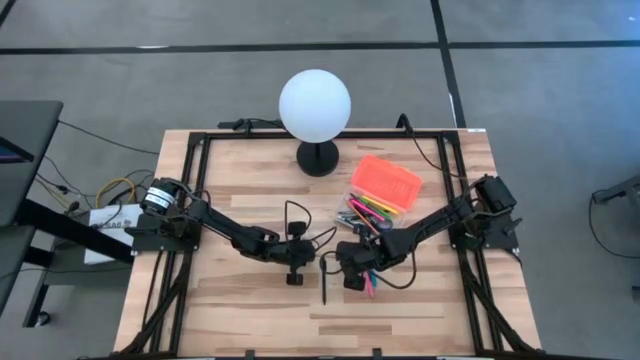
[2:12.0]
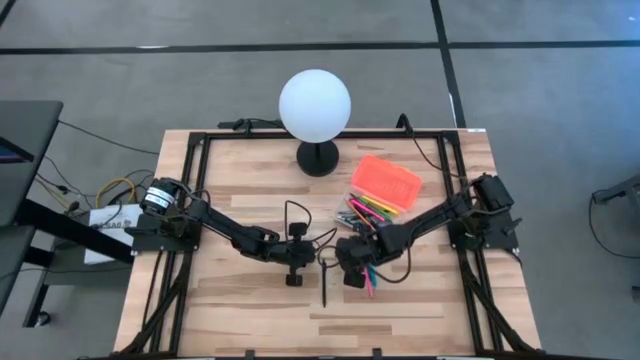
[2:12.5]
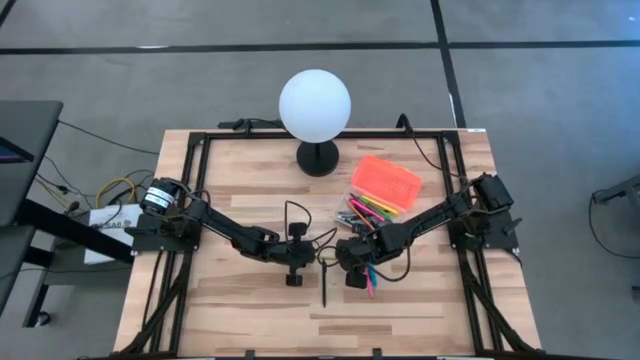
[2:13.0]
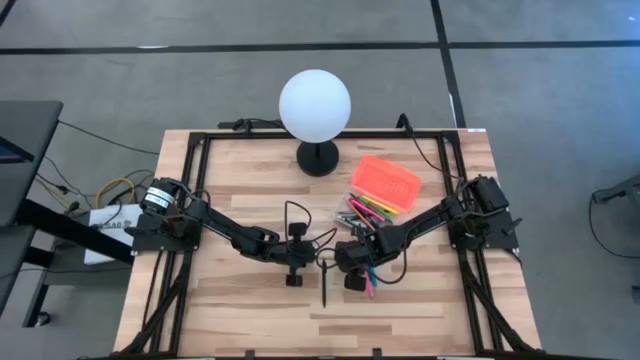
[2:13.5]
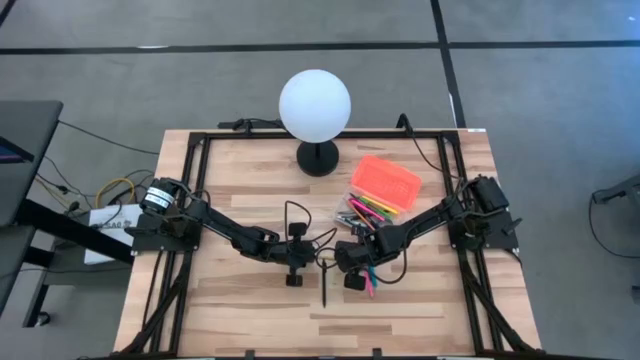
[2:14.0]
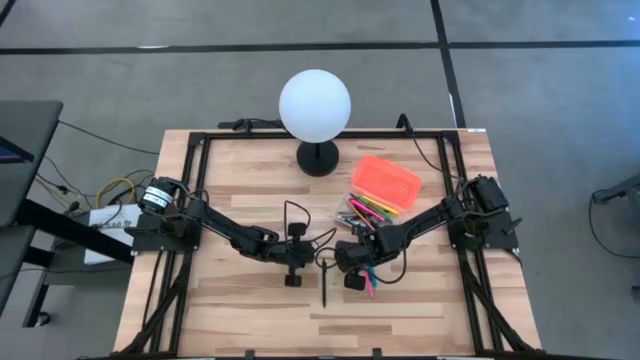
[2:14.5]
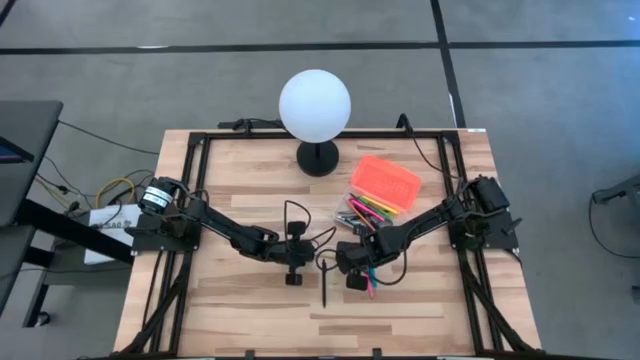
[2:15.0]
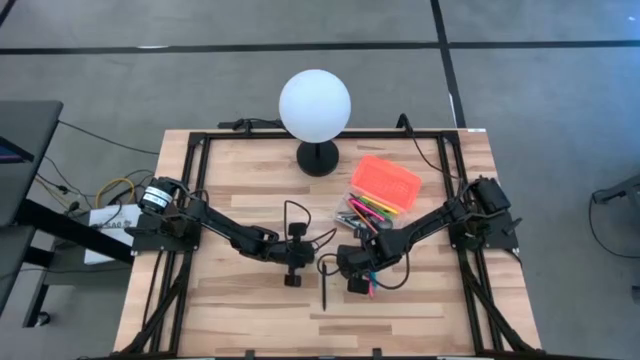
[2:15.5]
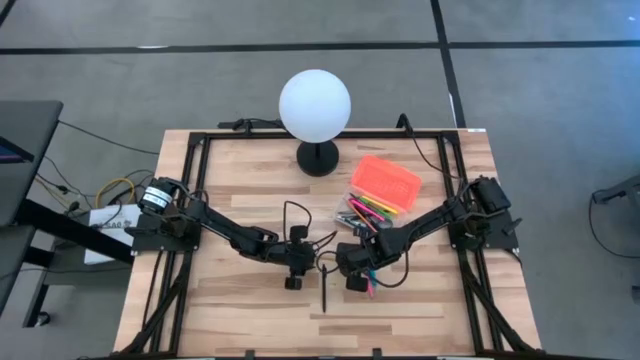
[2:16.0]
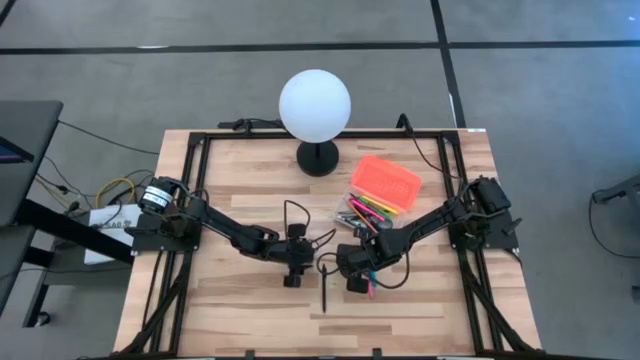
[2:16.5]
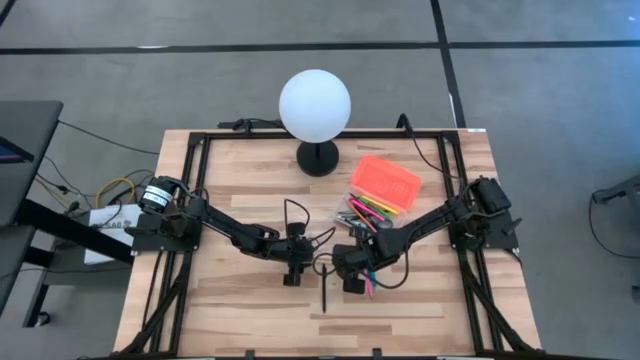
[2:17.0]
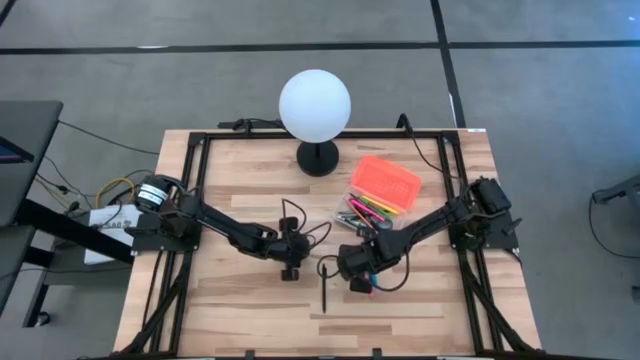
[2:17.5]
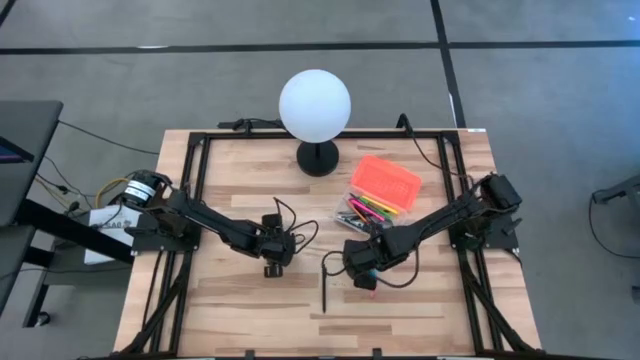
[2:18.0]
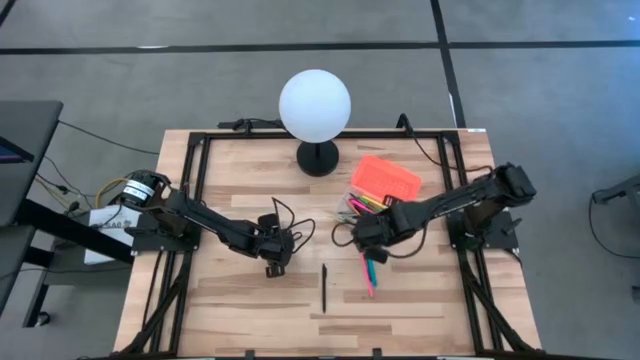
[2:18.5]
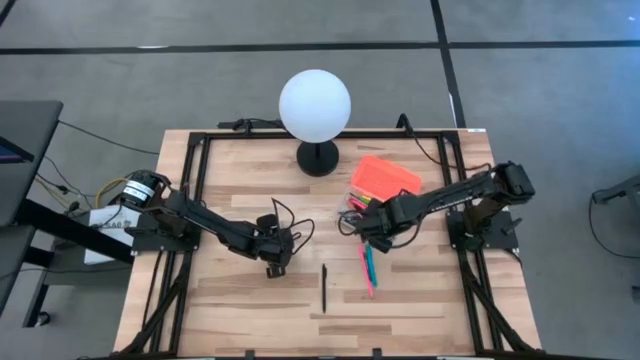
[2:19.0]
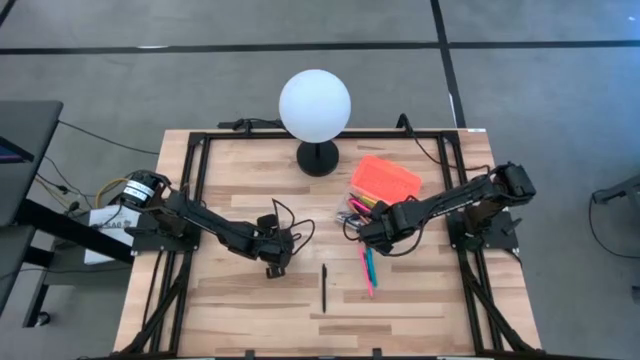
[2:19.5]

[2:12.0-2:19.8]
Task: Pick & place school supplies into a supply box
Put the yellow pencil into the orange supply box

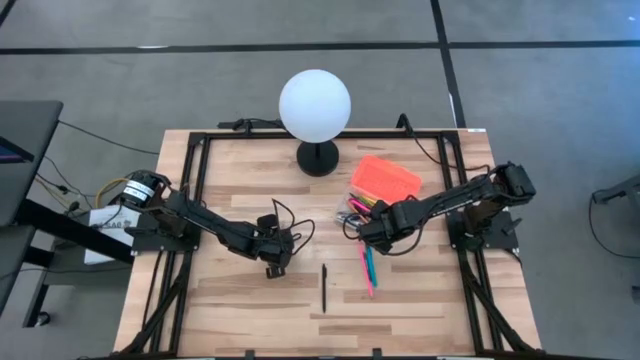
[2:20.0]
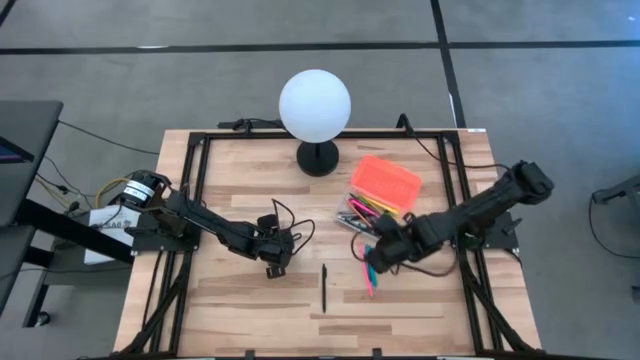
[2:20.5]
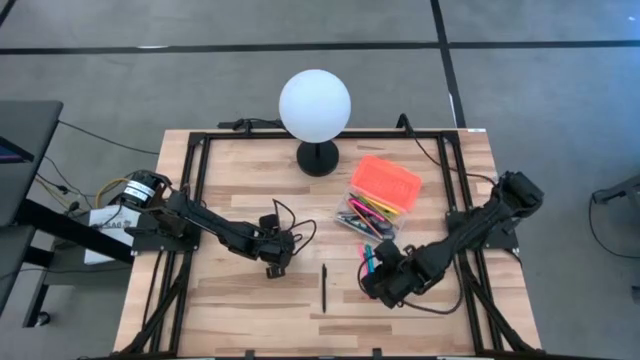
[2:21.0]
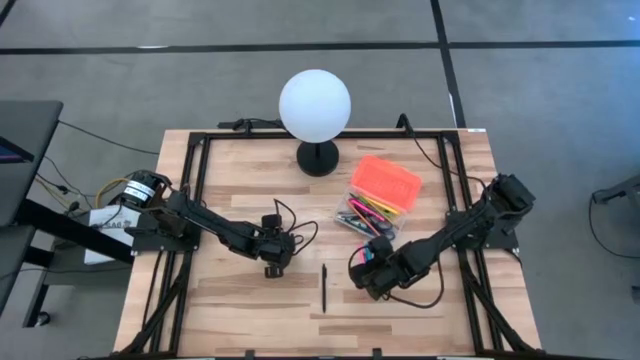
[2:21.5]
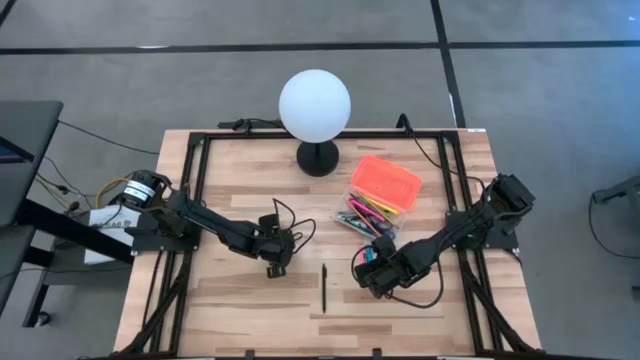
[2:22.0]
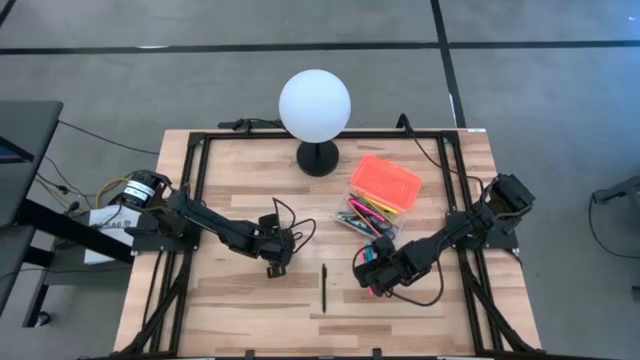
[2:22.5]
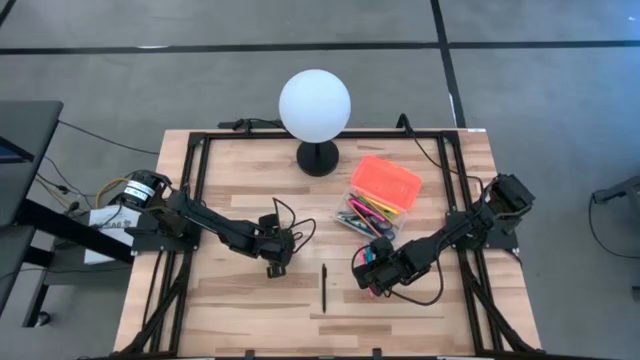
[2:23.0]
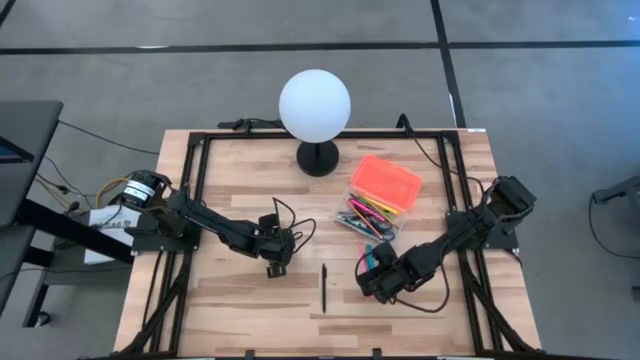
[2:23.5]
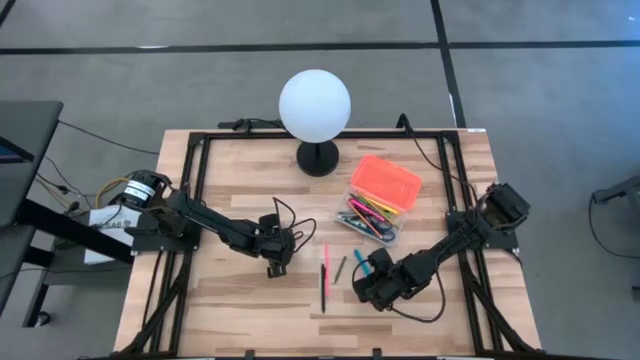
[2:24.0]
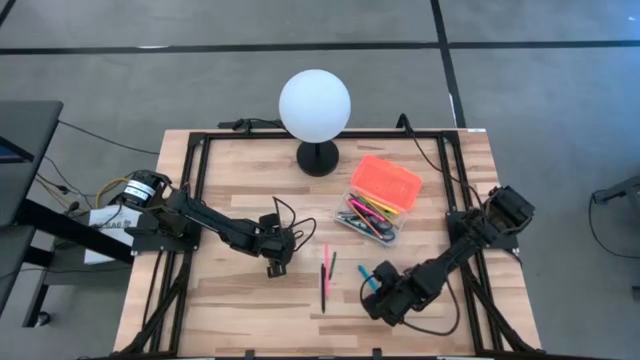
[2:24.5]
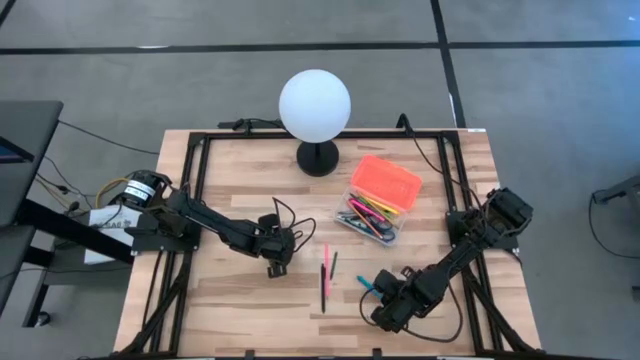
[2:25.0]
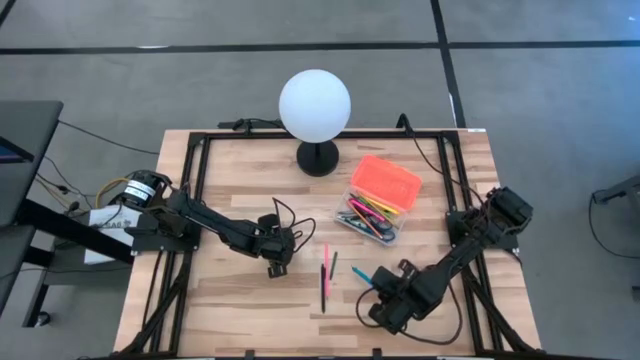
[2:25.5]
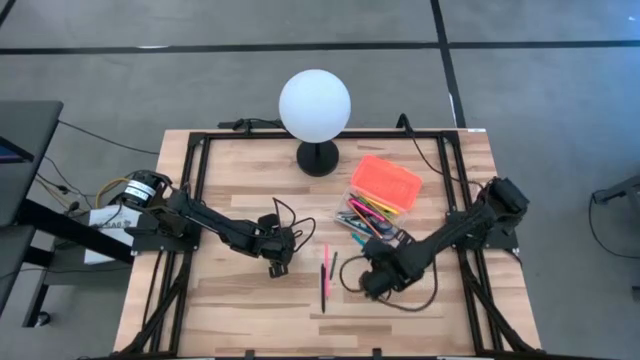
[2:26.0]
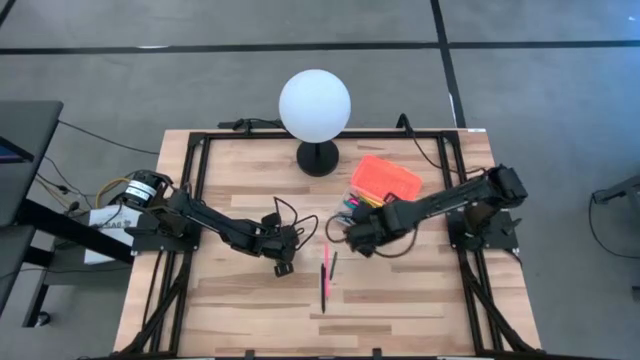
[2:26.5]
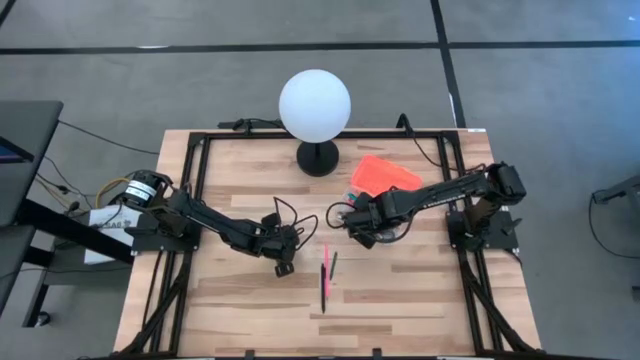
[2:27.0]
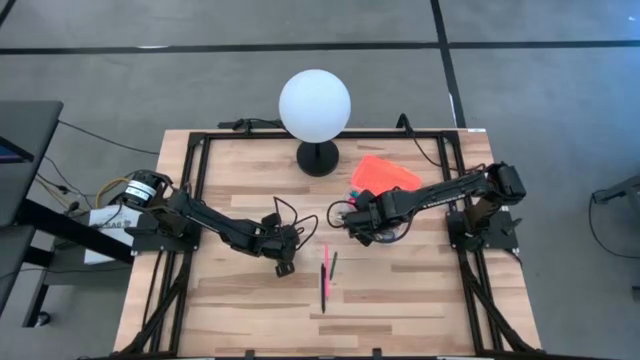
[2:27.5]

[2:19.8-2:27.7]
Put the blue pen into the orange supply box

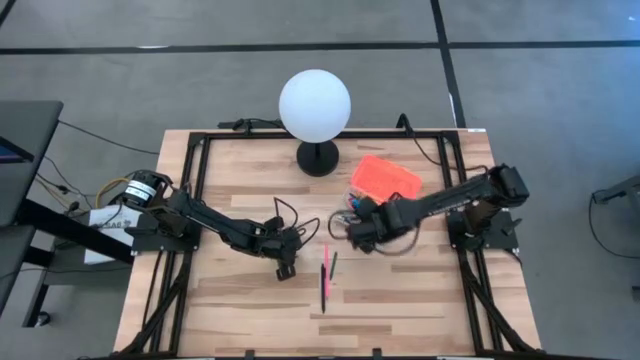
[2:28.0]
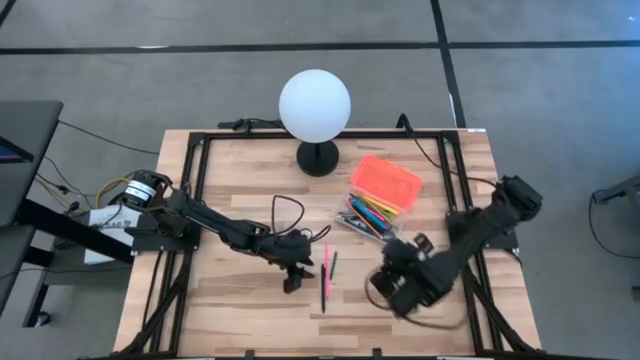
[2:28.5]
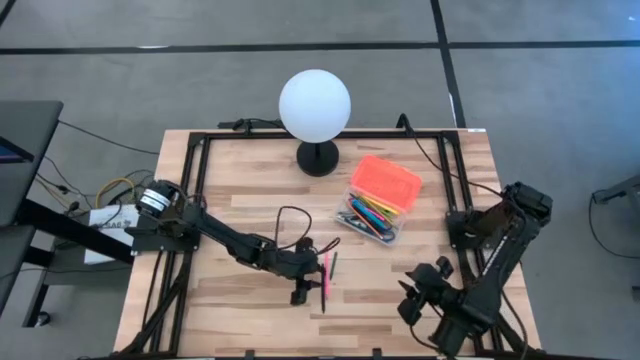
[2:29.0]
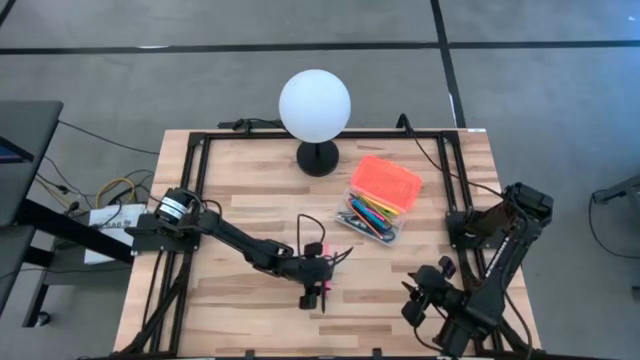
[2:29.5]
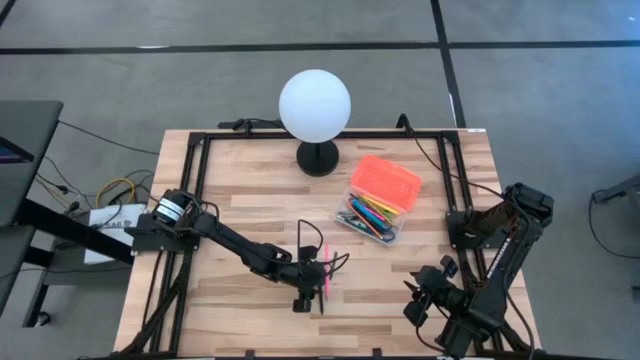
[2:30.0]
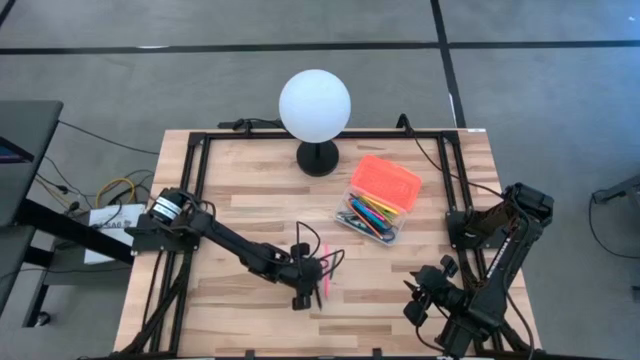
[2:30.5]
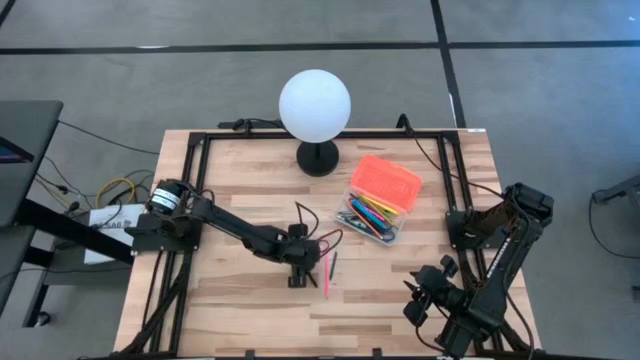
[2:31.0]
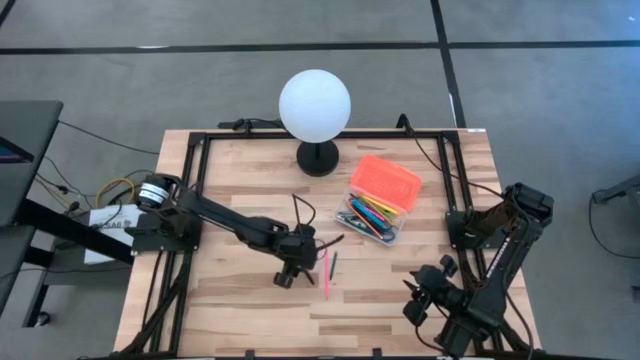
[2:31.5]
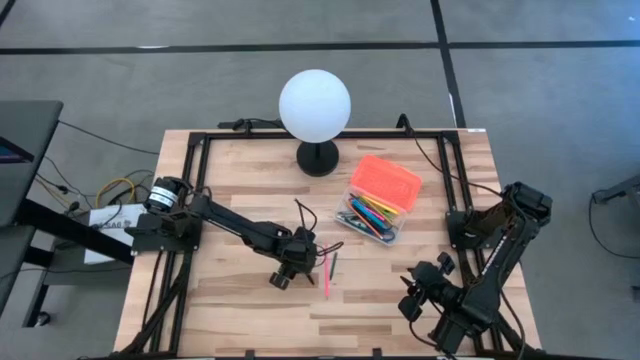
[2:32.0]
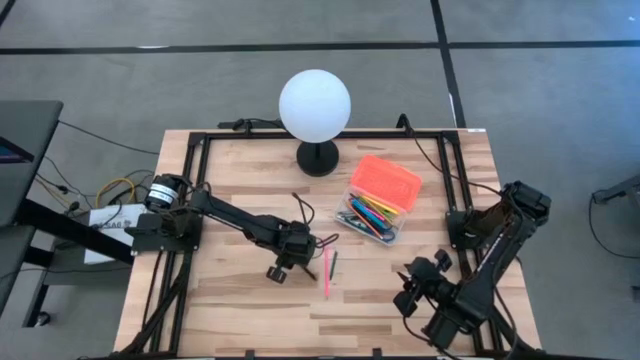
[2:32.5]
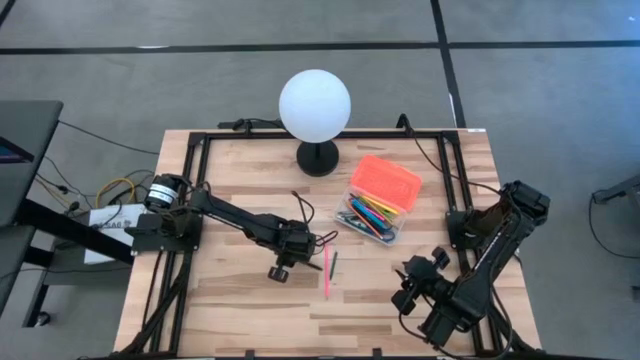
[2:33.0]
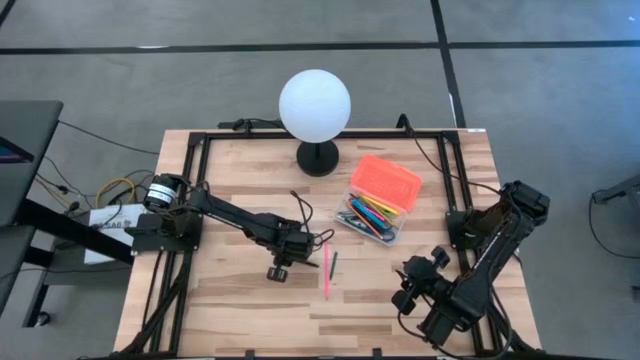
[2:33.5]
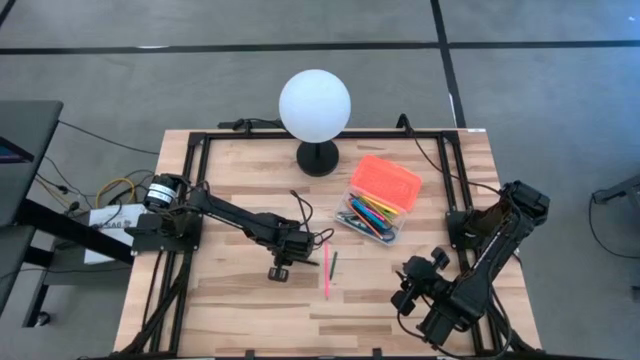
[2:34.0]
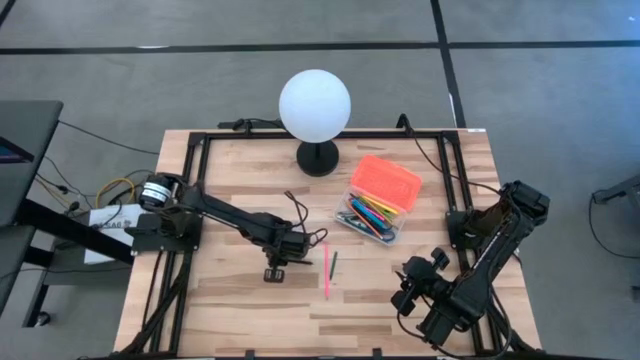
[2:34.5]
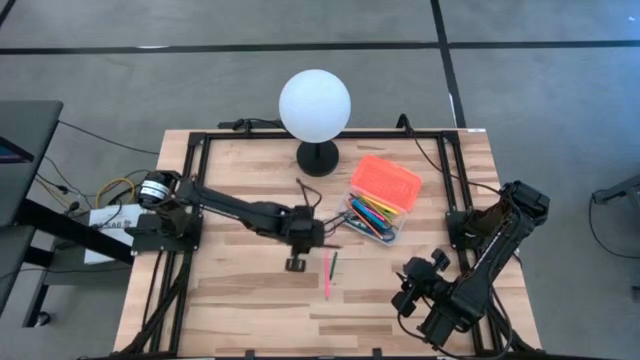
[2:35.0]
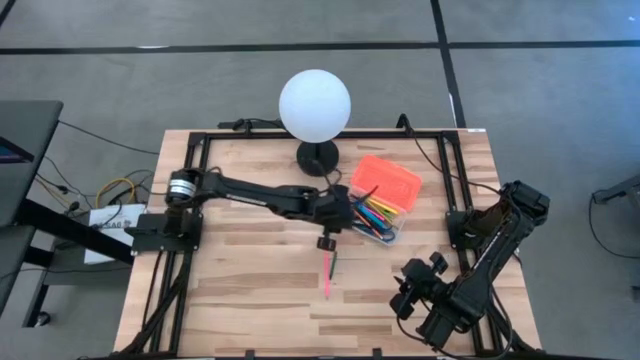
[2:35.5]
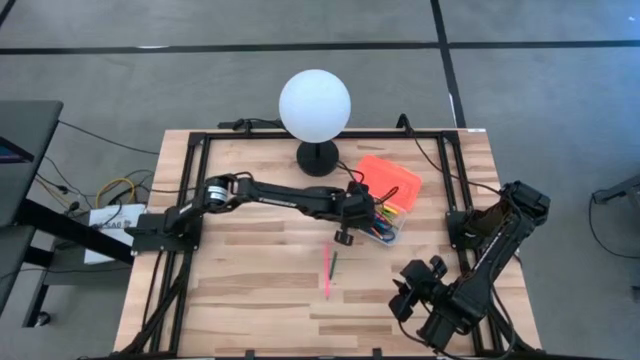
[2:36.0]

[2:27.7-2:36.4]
Put the black pen into the orange supply box
